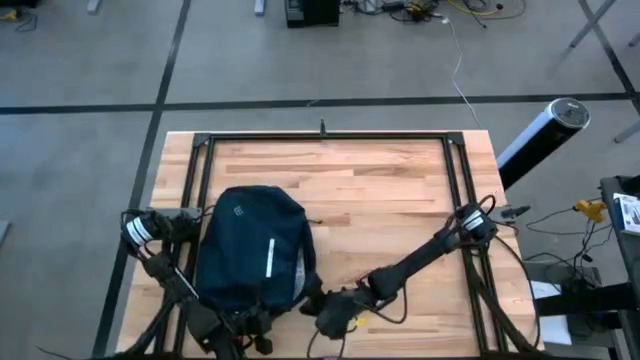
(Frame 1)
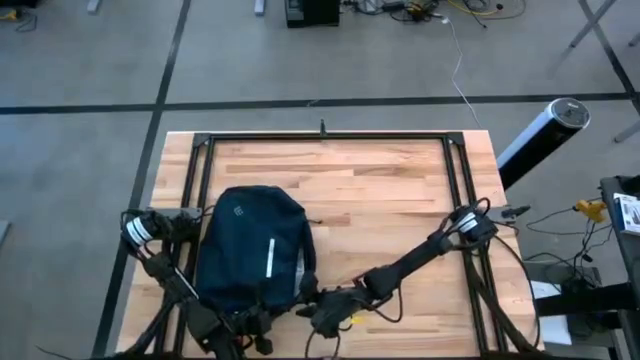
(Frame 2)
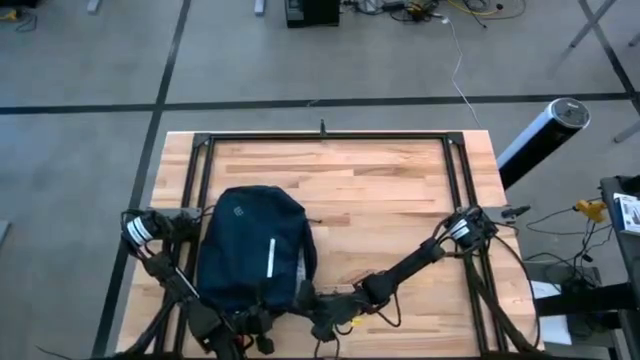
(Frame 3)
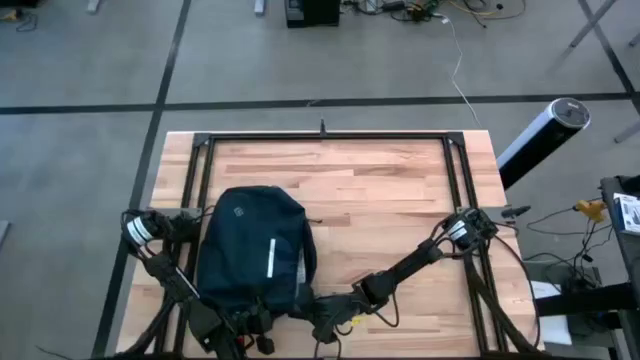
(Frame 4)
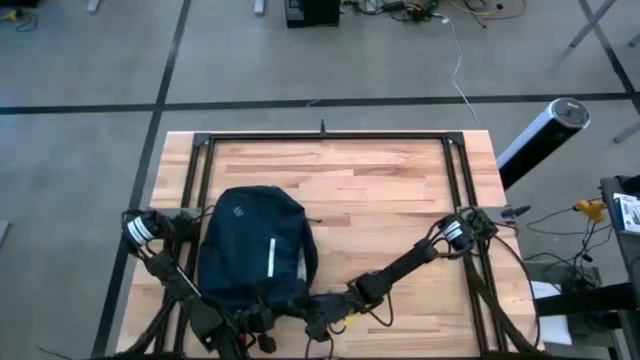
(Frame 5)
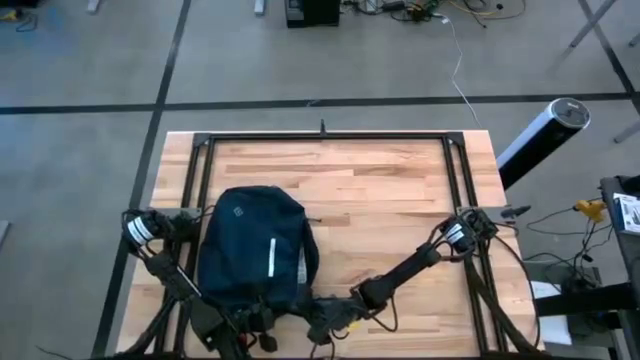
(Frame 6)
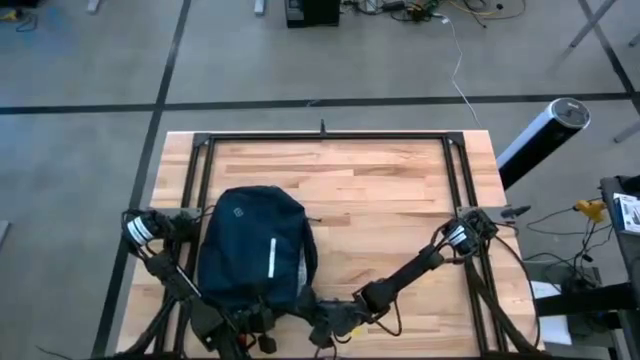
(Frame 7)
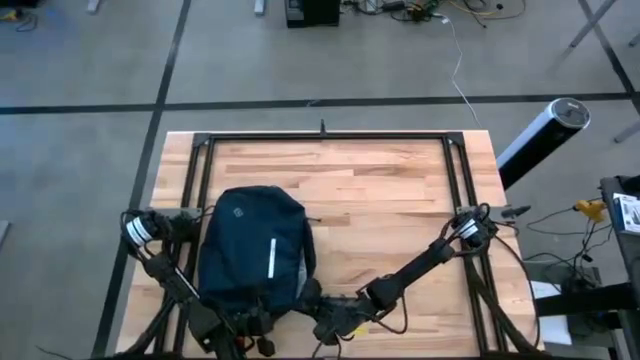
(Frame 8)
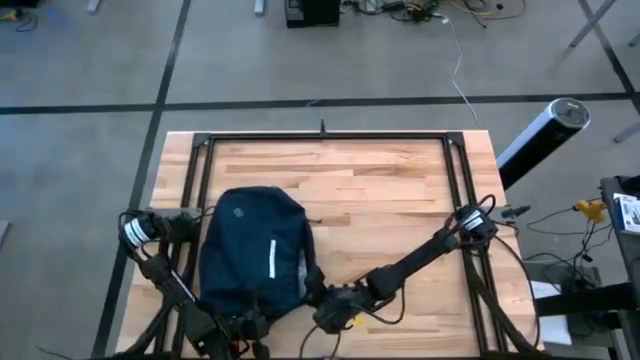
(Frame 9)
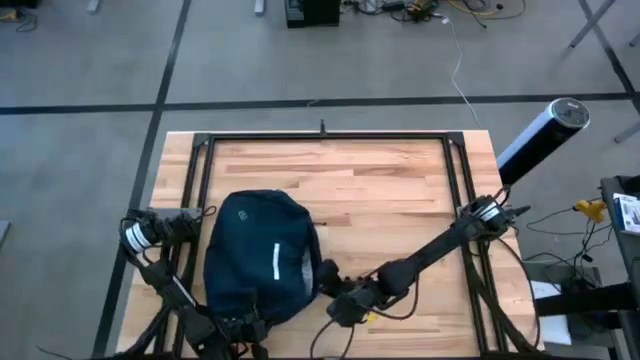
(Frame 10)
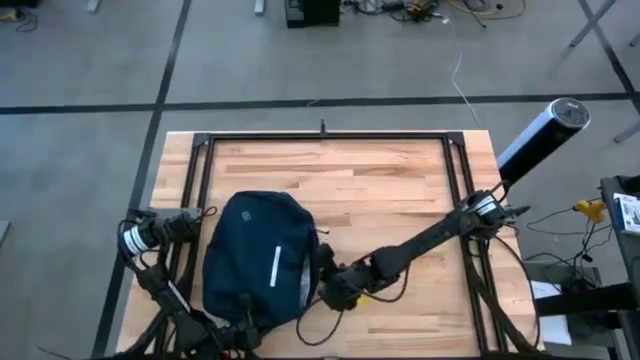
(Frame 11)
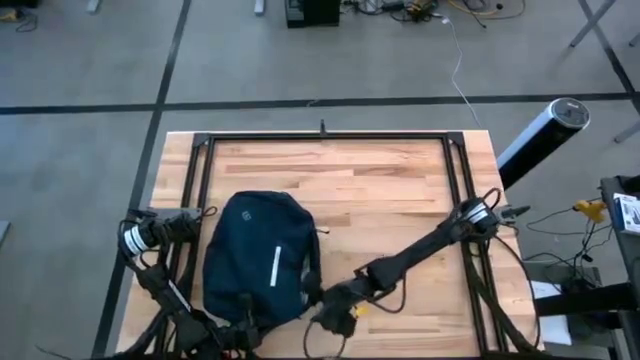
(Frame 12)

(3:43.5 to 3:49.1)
Task: Unpack backpack
Close the blue backpack

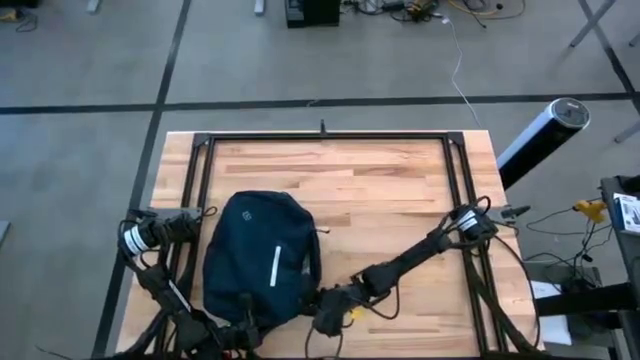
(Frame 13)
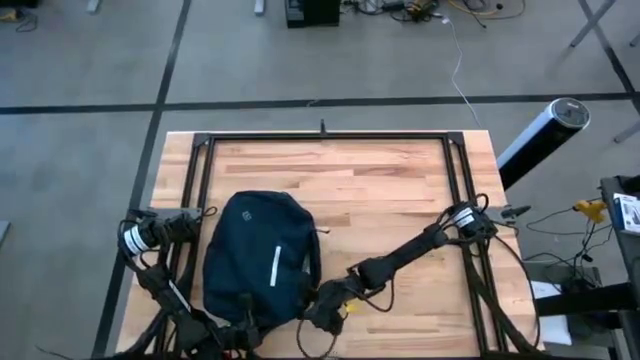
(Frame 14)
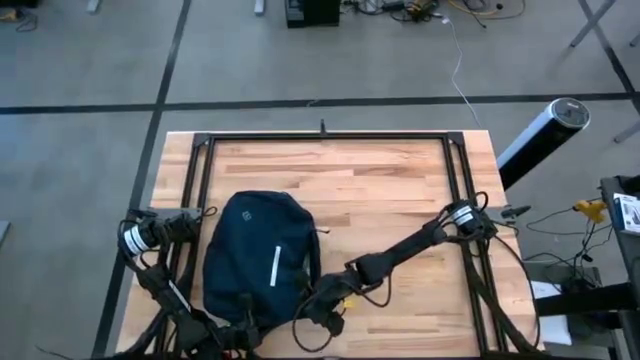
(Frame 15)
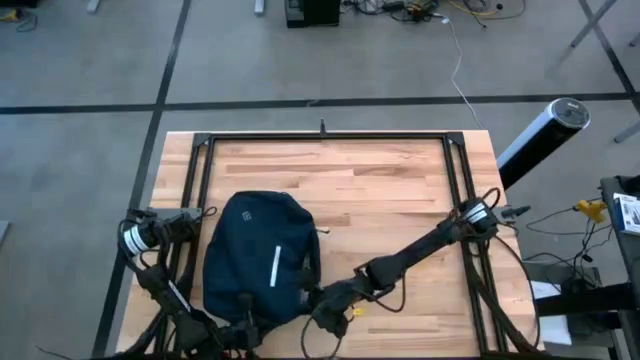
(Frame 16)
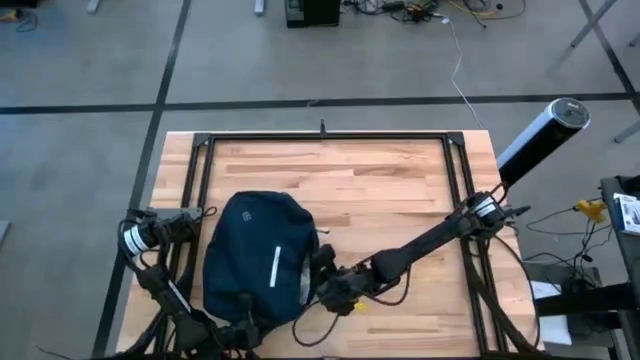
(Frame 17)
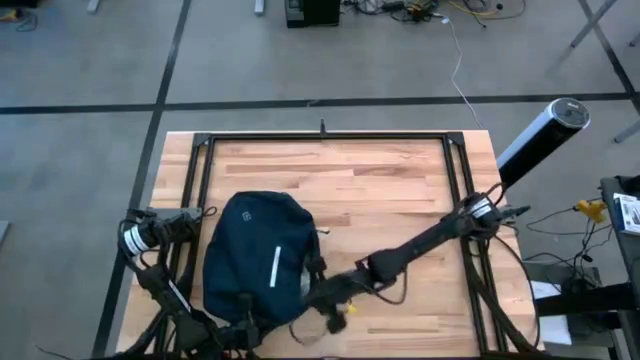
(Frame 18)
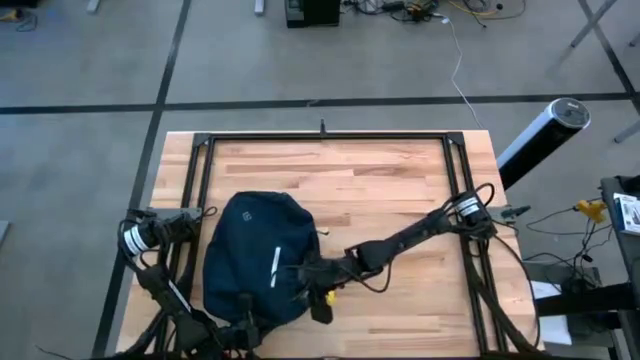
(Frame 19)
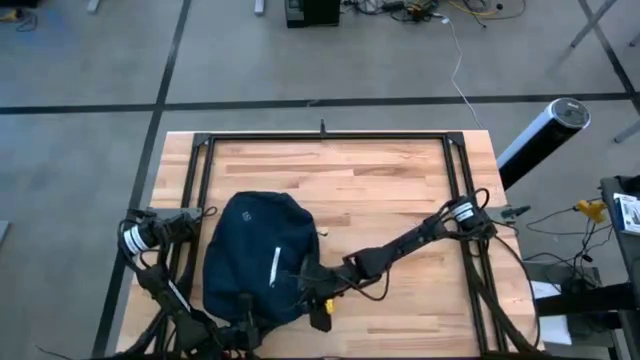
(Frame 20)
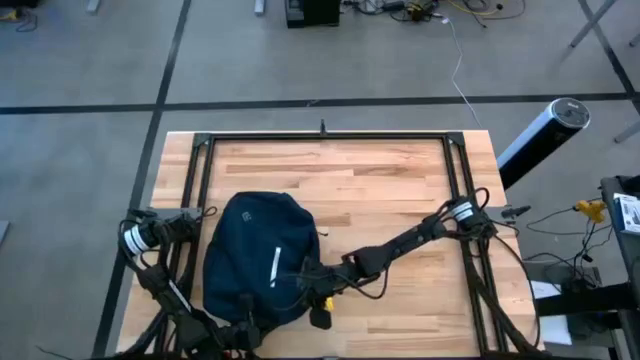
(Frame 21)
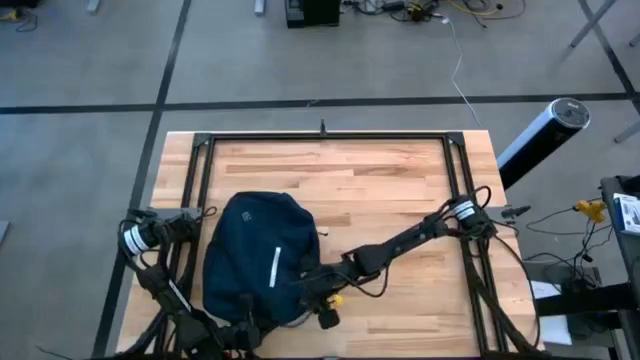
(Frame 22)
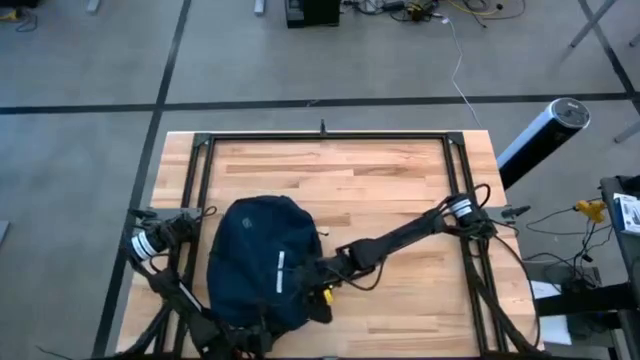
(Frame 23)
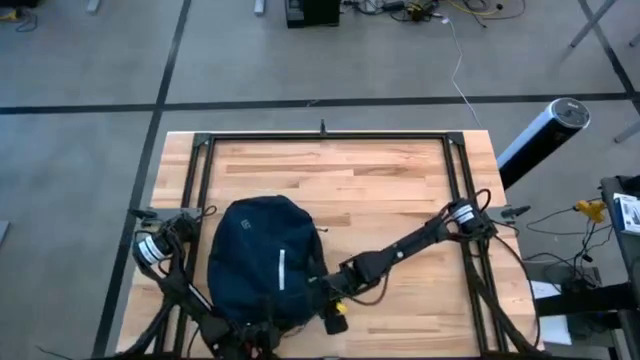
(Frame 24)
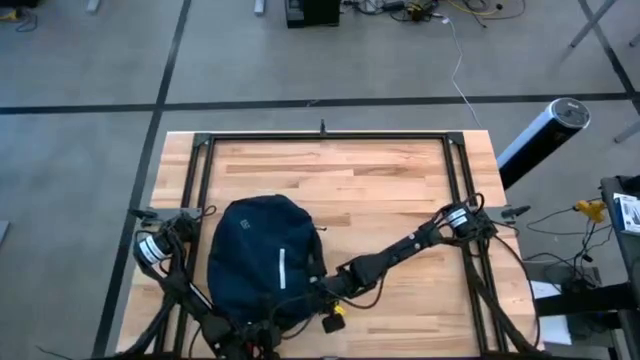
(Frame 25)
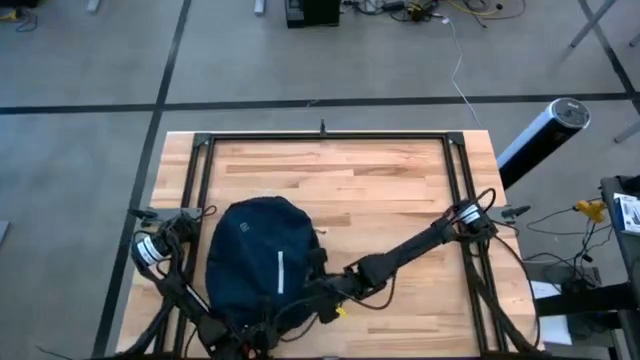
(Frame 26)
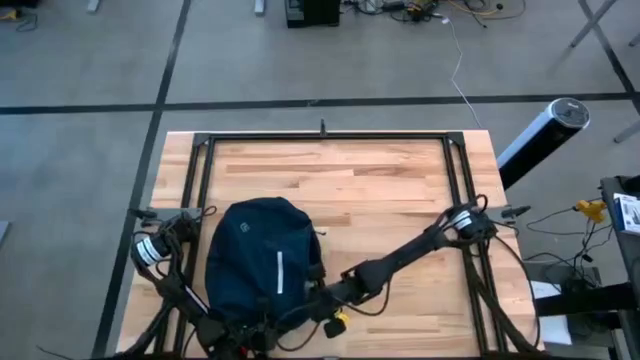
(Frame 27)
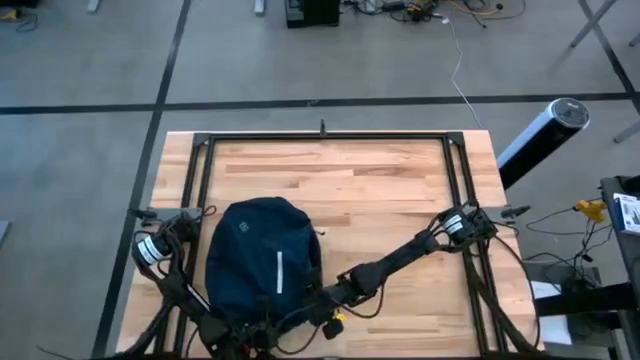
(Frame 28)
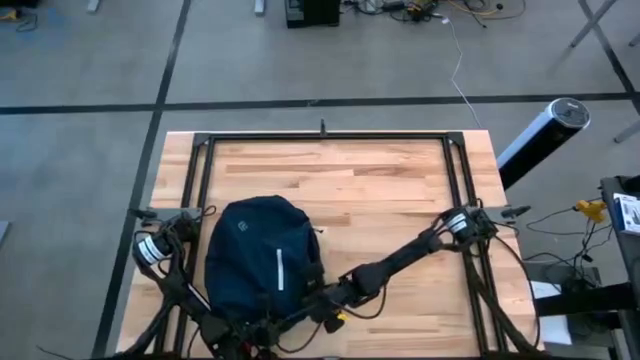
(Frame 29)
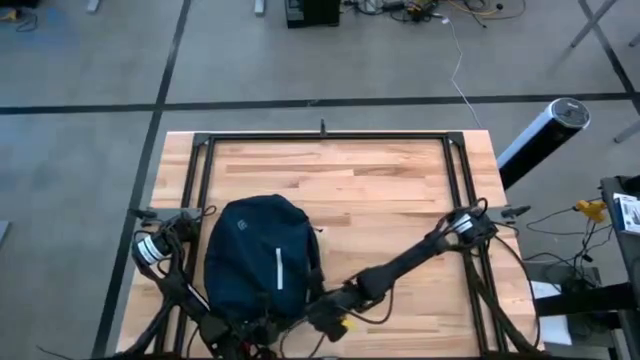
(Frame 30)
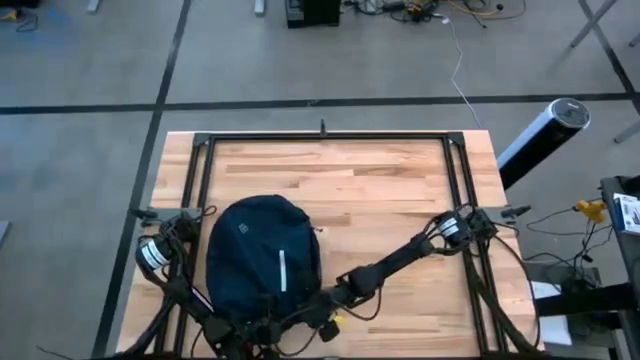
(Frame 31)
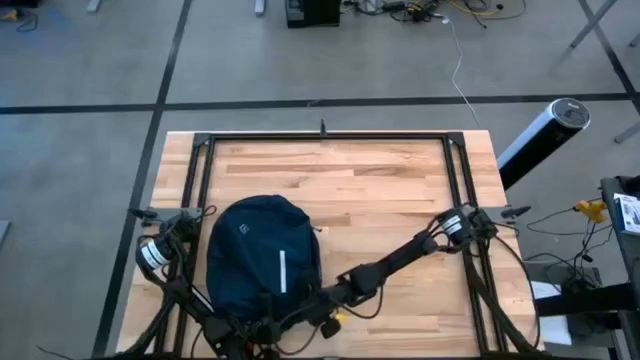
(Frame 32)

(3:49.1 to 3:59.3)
Close the blue backpack

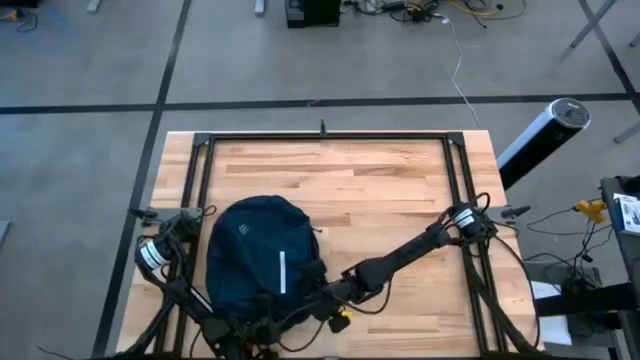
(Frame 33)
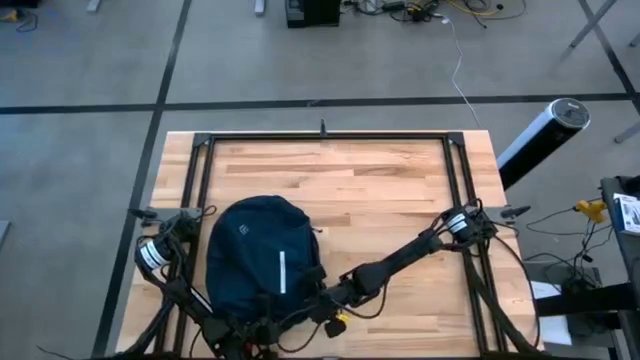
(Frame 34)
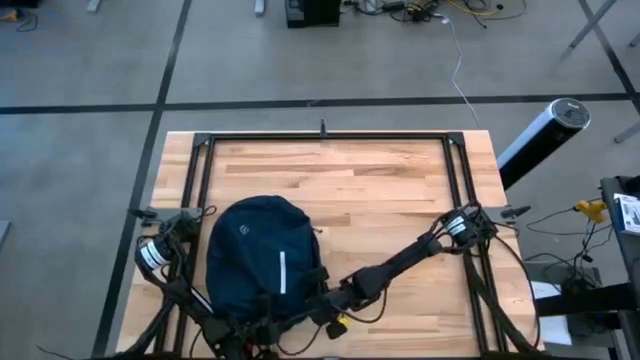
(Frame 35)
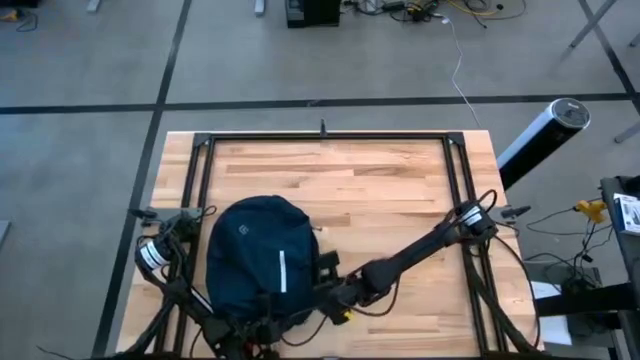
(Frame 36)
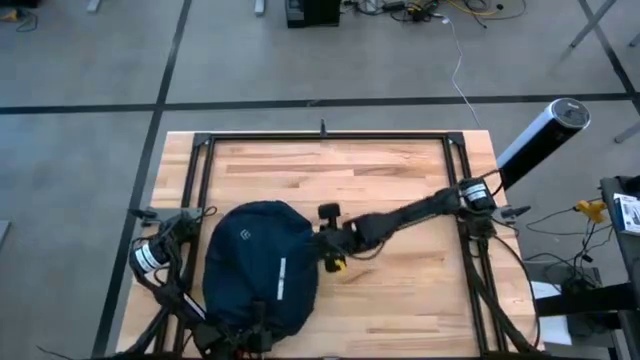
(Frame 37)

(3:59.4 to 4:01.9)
Close the blue backpack

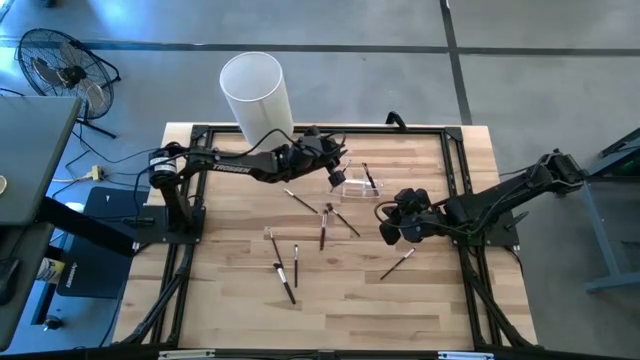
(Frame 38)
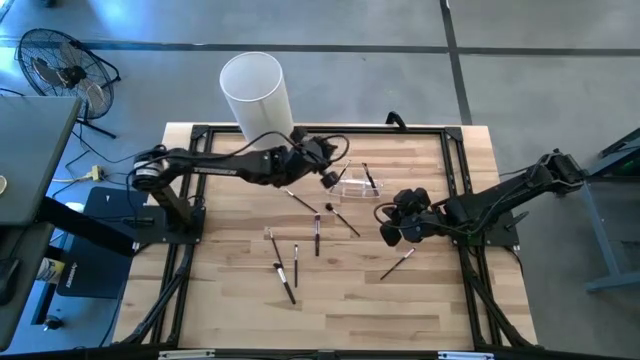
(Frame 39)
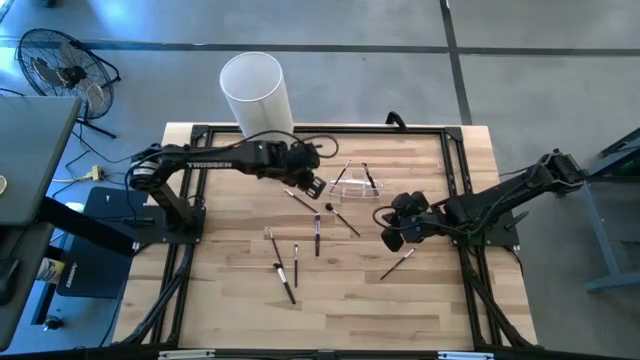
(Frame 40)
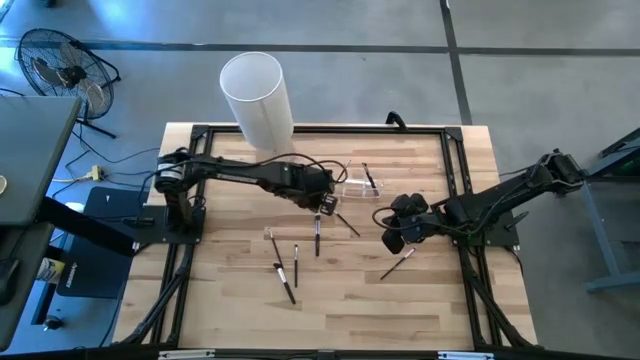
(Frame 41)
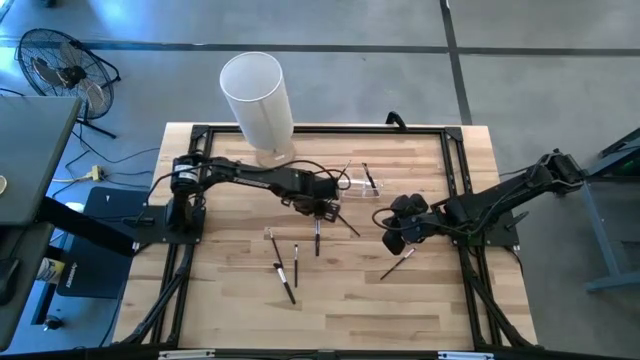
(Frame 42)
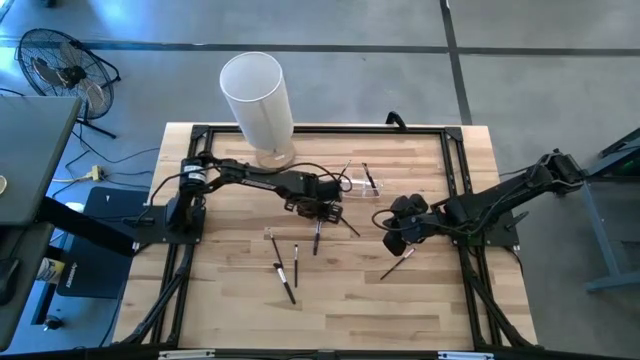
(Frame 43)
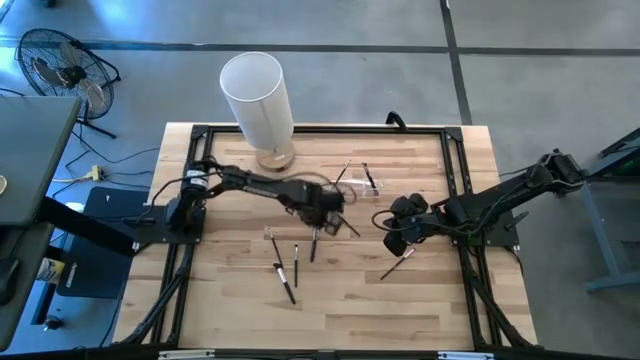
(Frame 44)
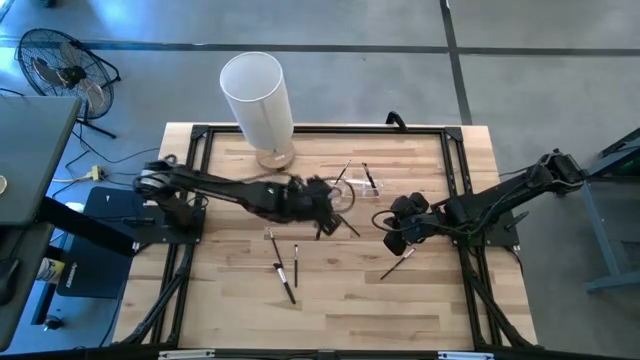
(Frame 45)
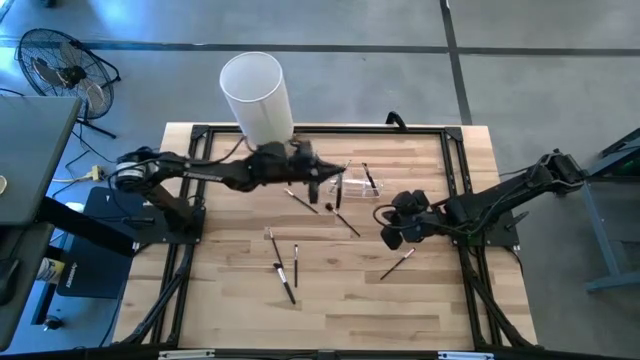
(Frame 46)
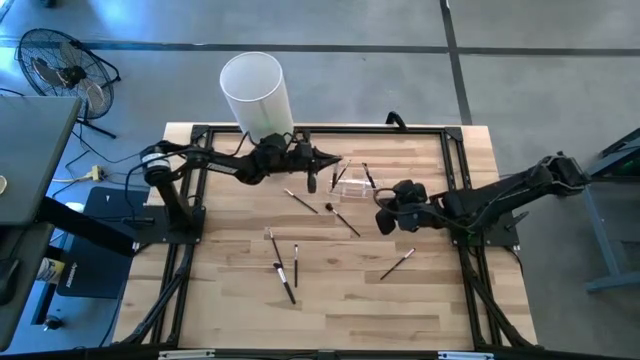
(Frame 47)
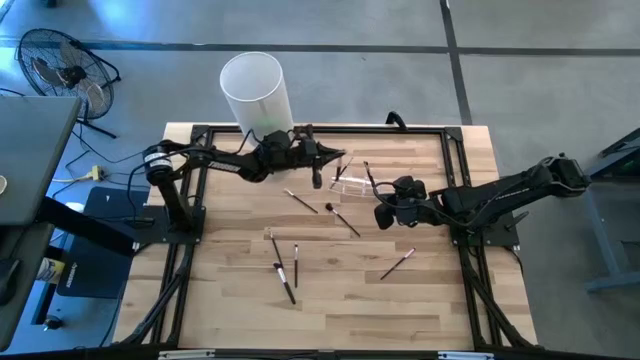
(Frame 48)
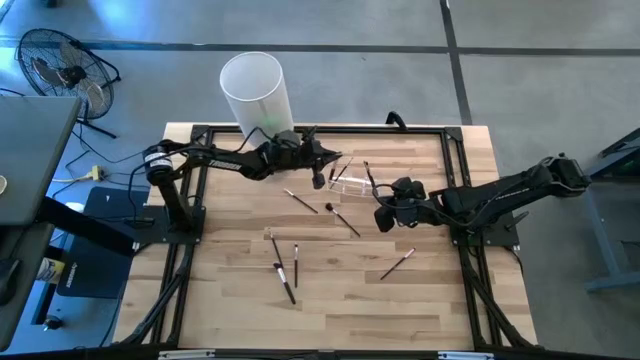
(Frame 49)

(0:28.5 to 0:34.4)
Task: Put items in baskets/containers
Put the black blush brush into the transparent organizer
